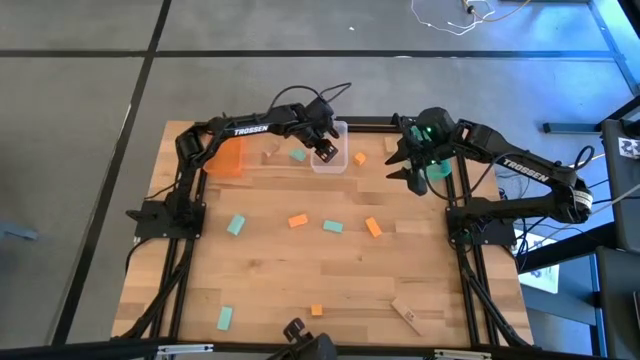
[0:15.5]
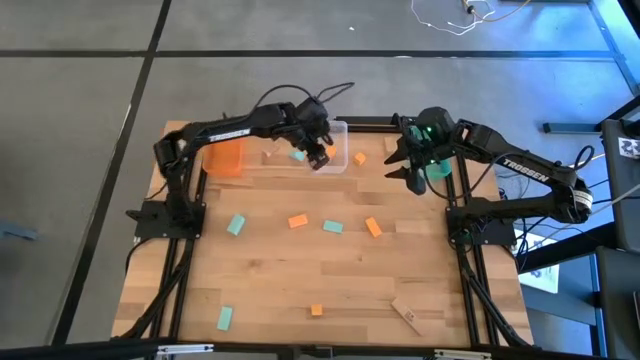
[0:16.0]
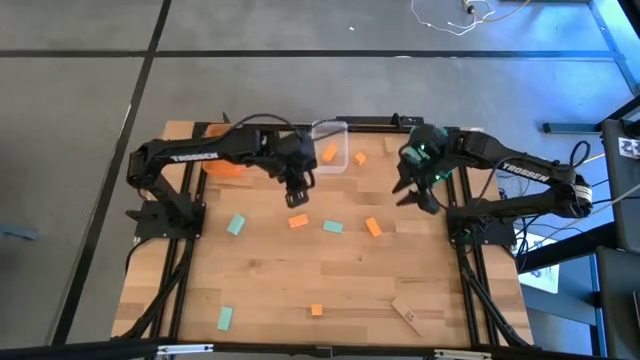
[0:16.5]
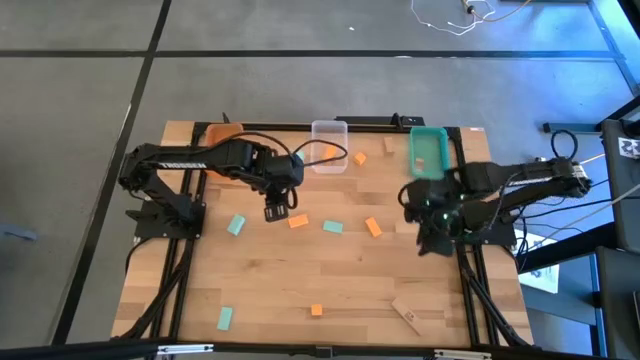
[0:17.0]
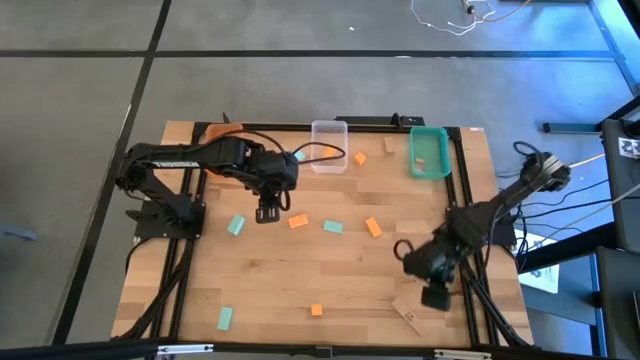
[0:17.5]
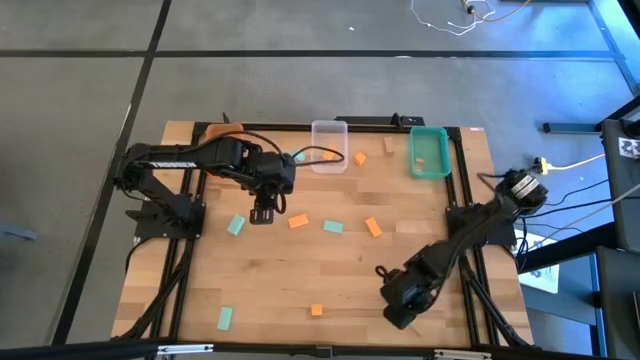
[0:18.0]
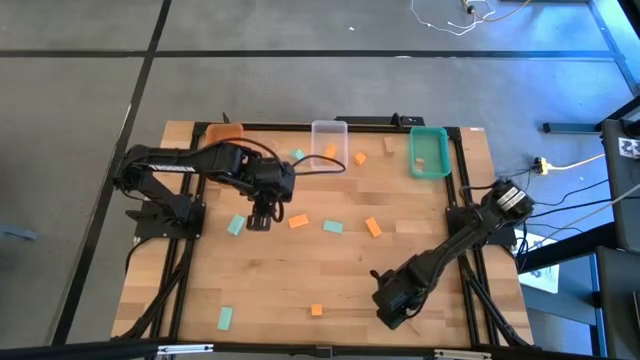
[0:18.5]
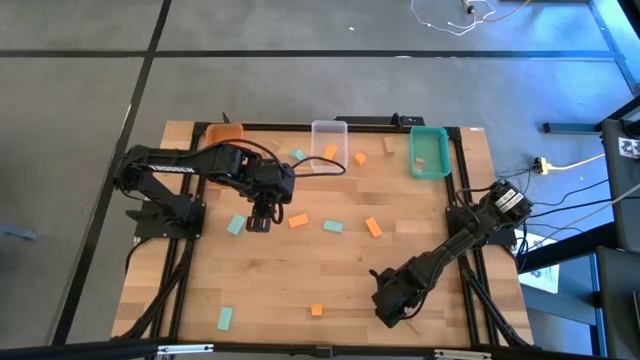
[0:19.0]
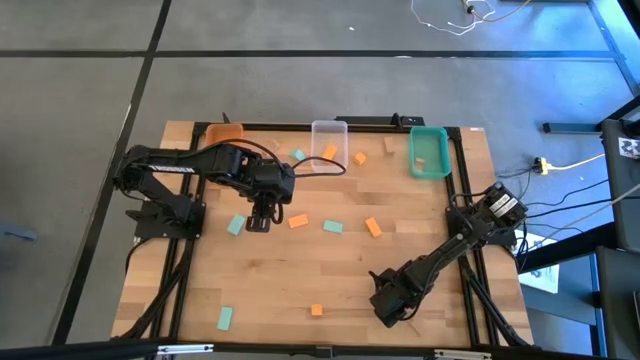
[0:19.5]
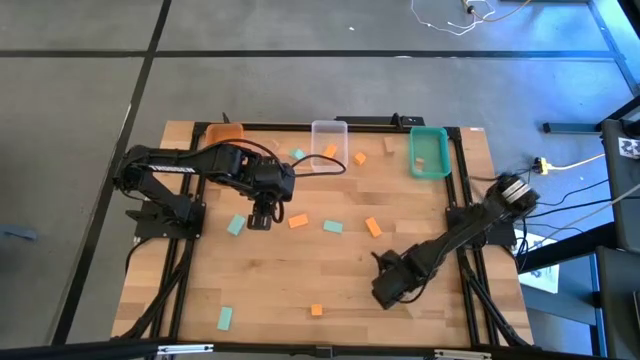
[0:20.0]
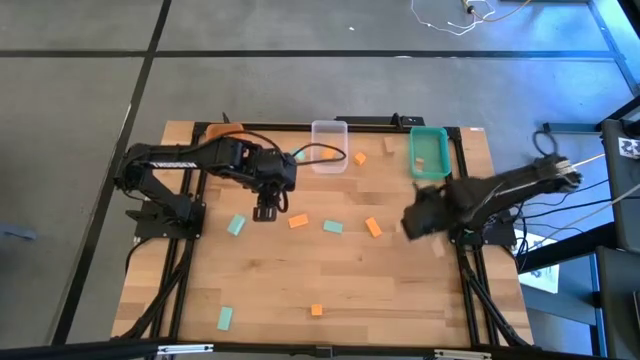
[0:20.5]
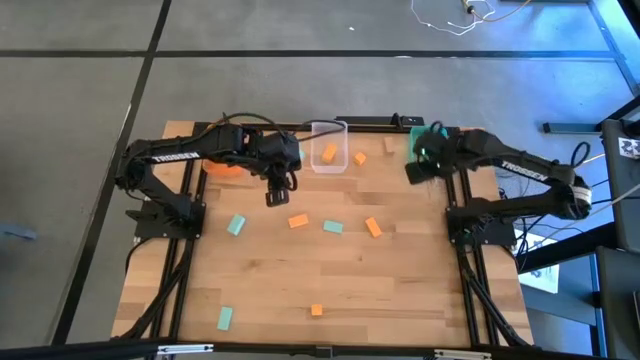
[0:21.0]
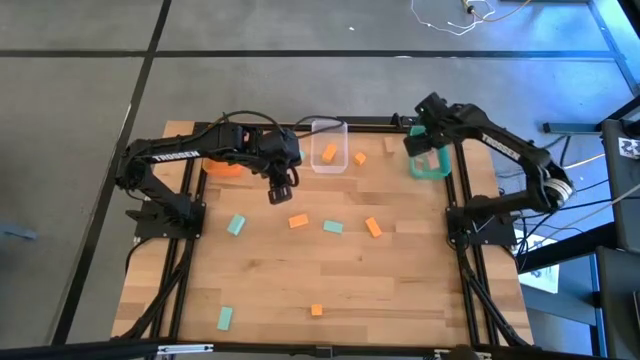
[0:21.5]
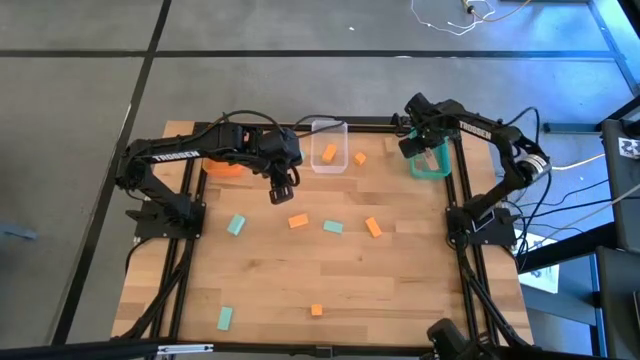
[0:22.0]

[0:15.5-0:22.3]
Task: Sort & place blocks by color
Put the brown block into the blue bin

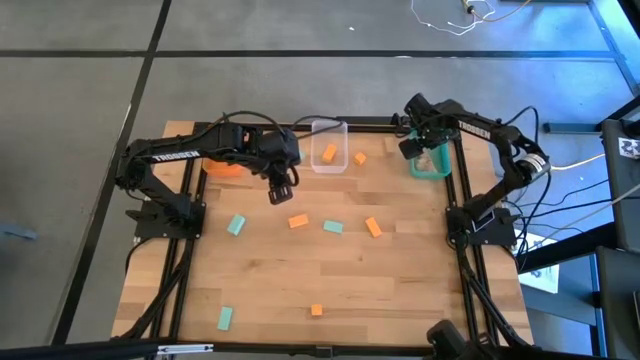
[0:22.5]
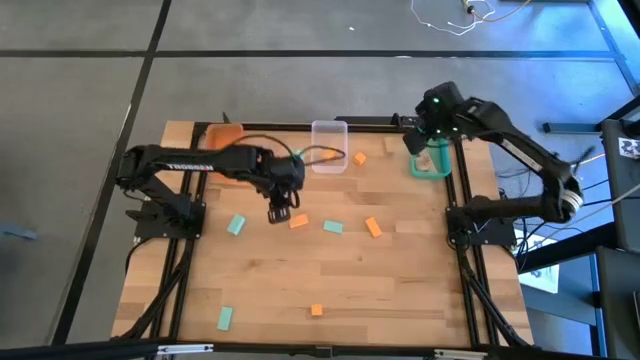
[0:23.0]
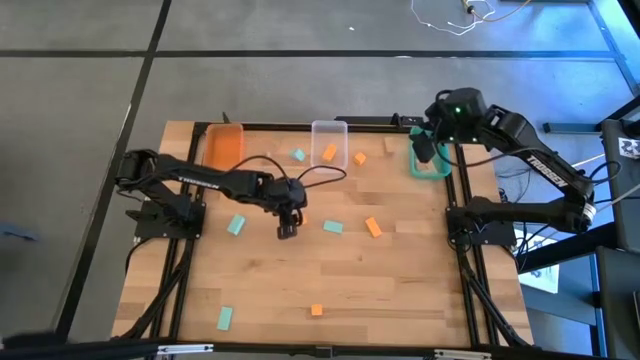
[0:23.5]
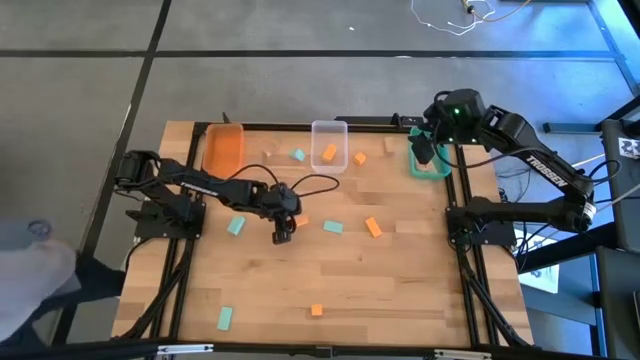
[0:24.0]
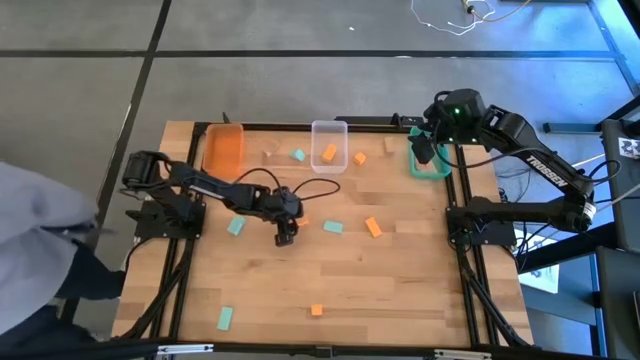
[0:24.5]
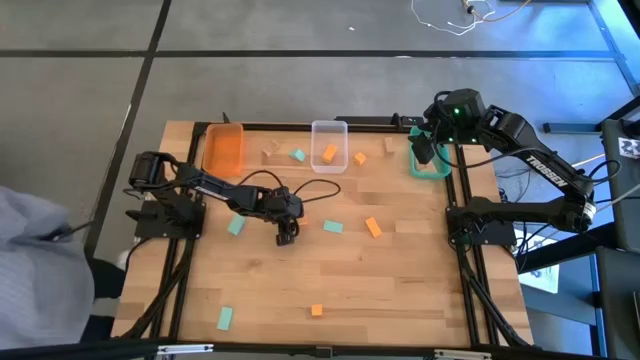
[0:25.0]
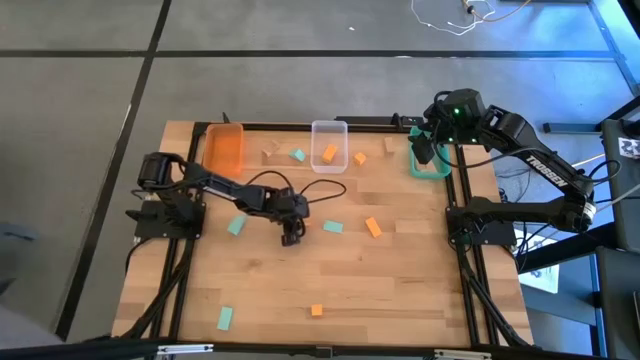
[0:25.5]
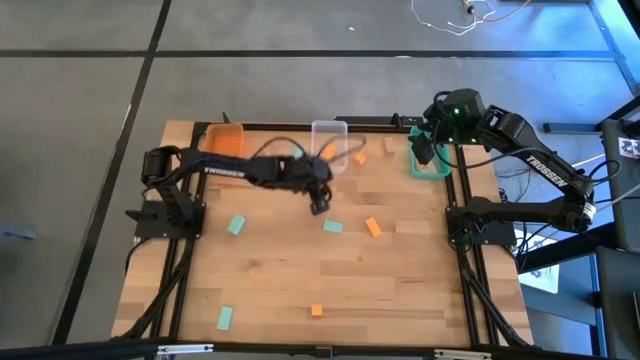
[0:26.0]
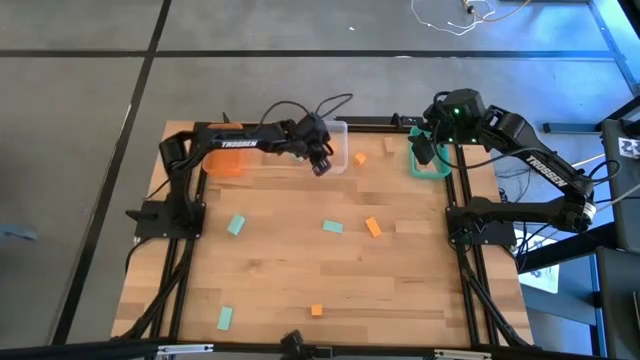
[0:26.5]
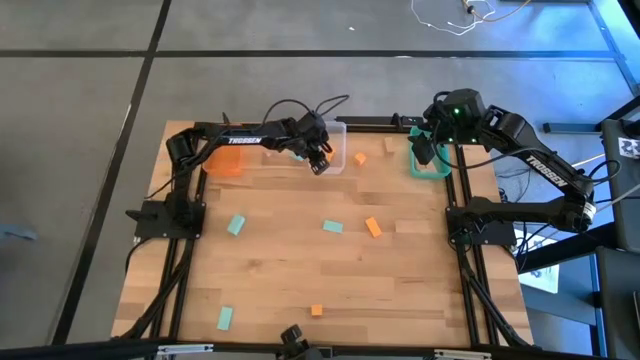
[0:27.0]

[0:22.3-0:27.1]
Put the orange block into the transparent bin

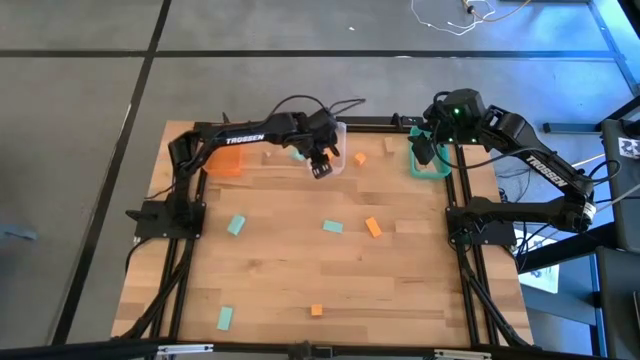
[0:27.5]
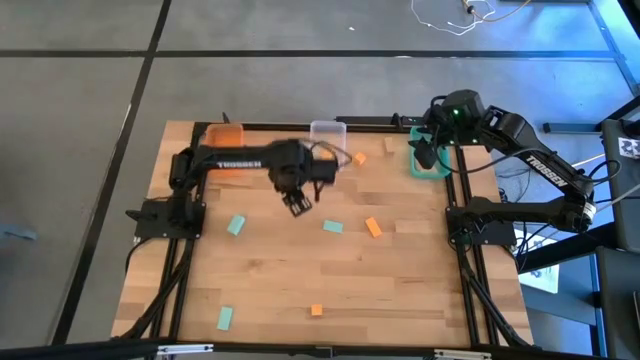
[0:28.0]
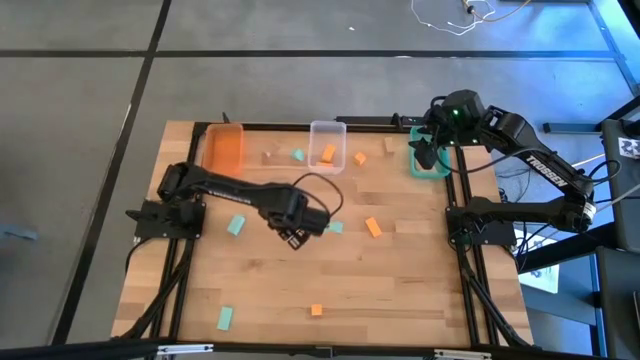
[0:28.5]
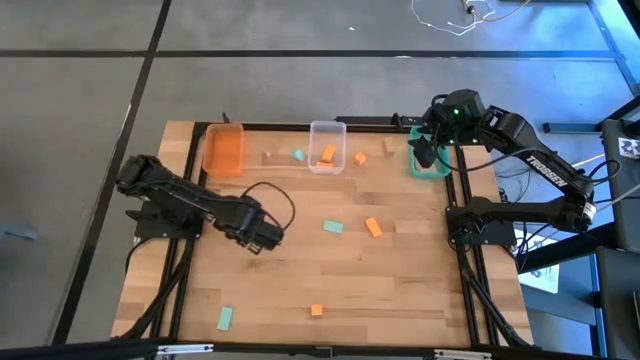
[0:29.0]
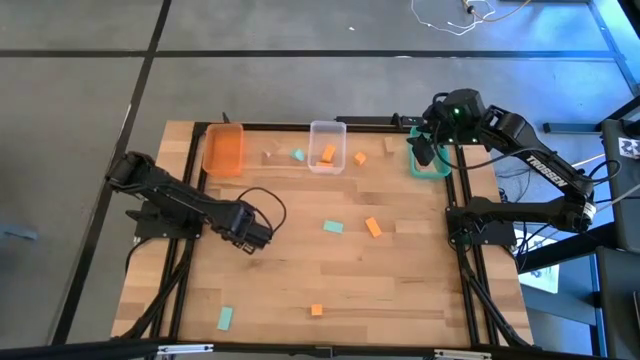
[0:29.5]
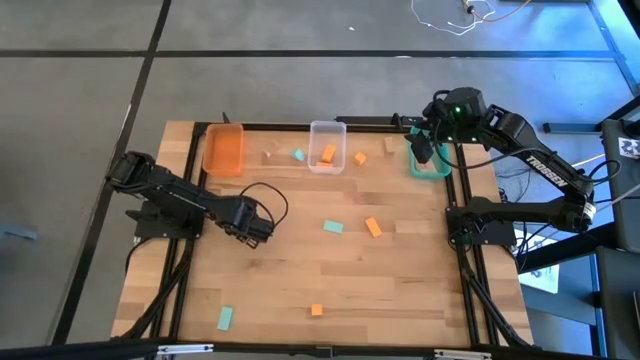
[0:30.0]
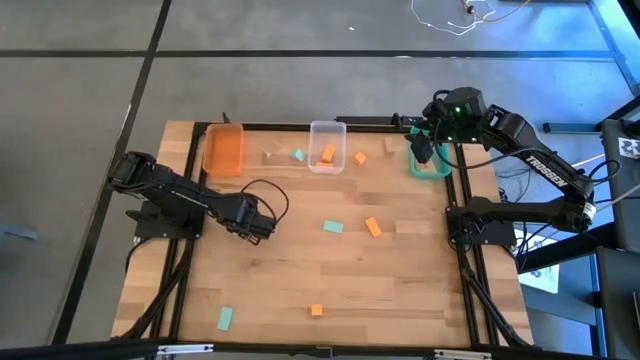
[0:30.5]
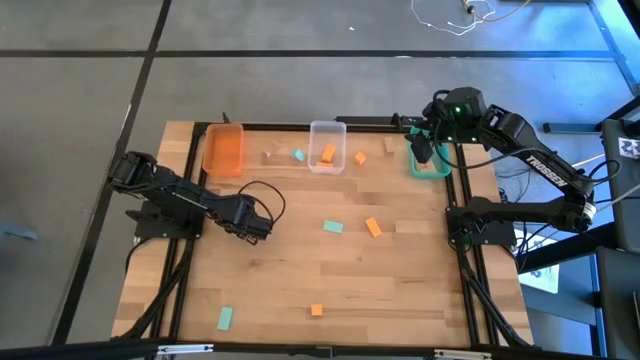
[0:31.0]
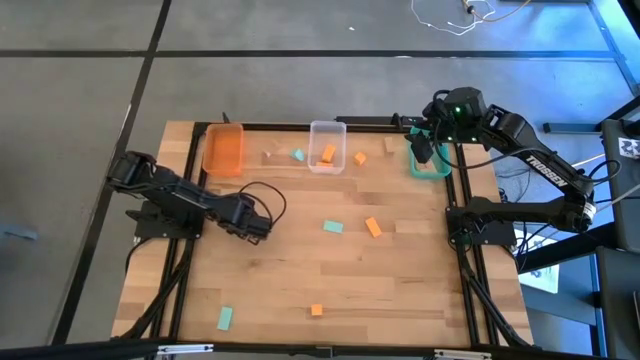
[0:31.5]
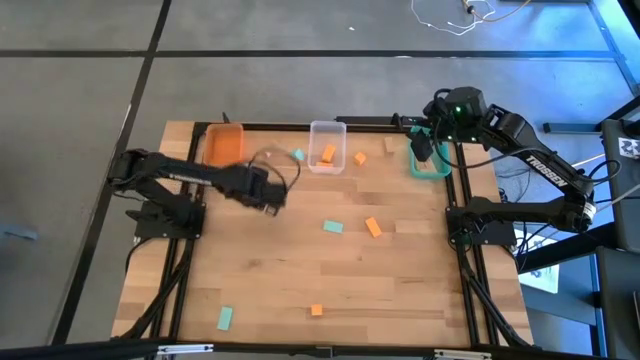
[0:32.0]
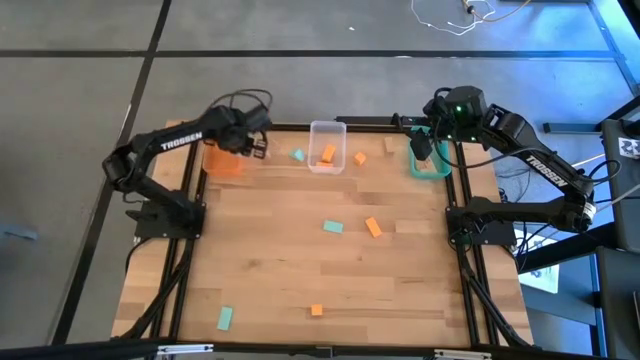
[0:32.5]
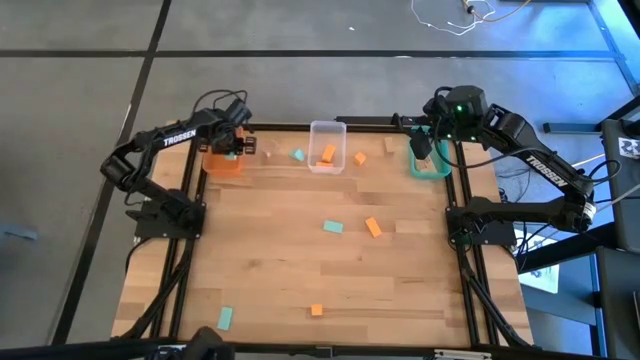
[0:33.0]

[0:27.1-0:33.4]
Put the blue block into the orange bin

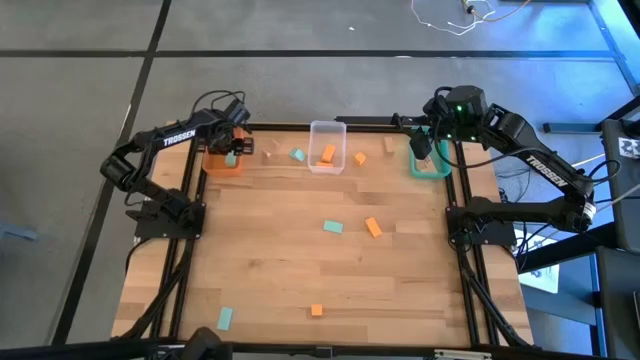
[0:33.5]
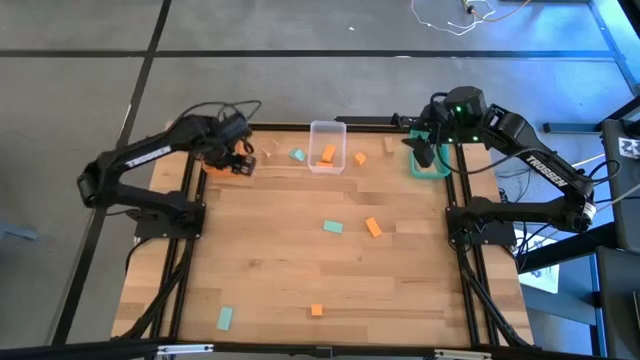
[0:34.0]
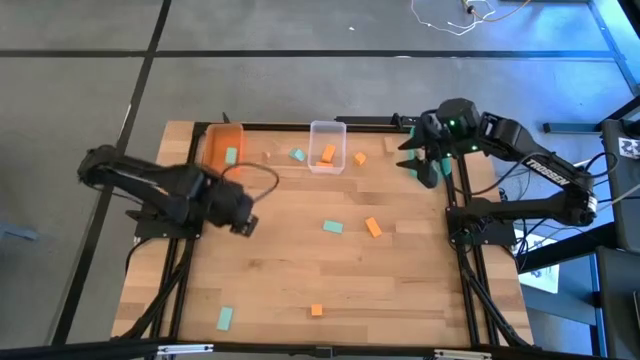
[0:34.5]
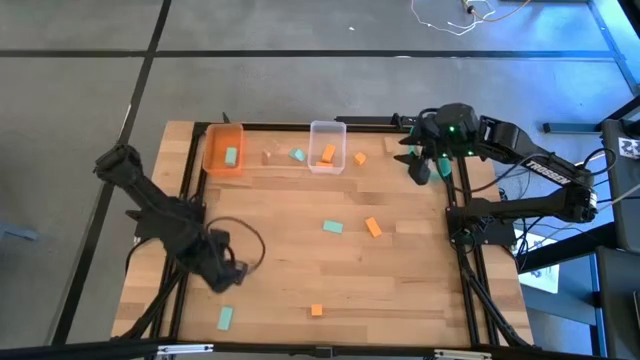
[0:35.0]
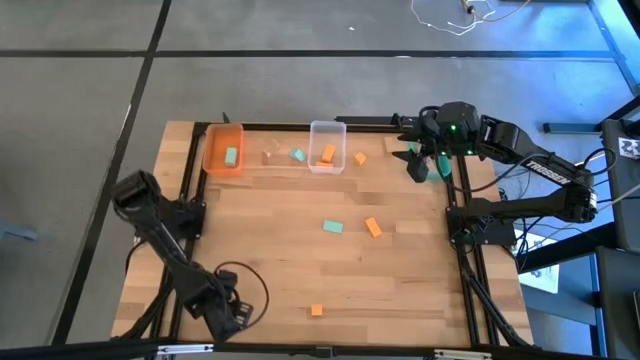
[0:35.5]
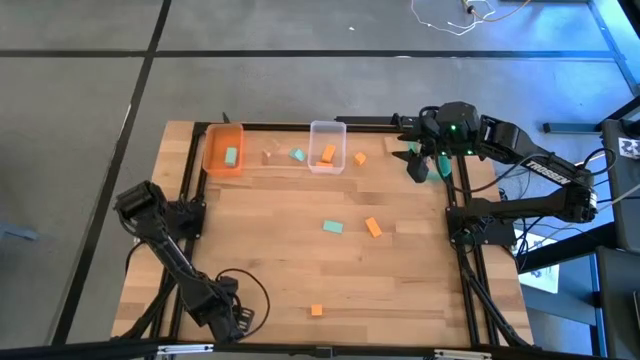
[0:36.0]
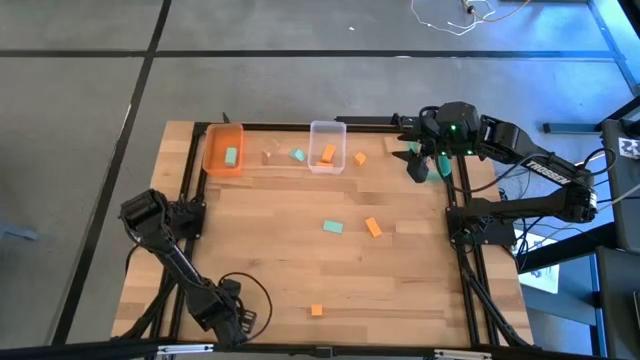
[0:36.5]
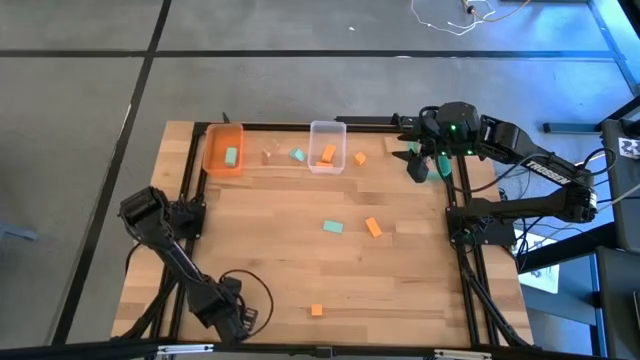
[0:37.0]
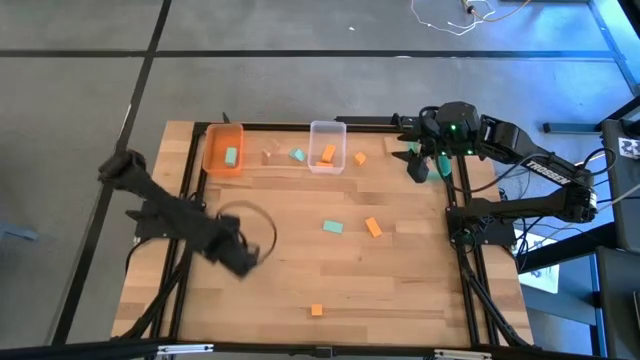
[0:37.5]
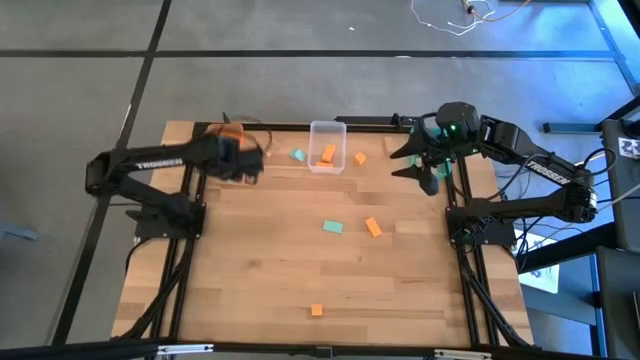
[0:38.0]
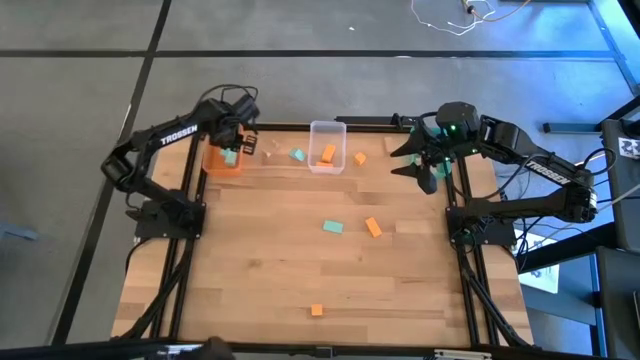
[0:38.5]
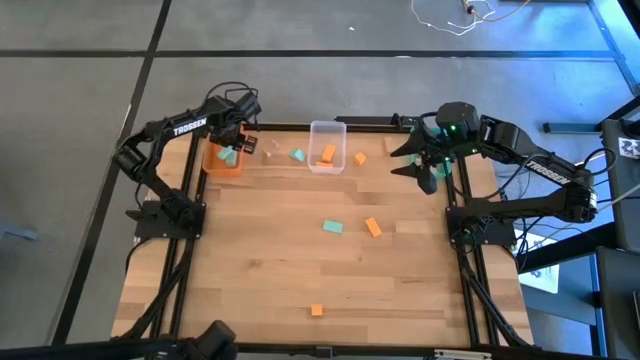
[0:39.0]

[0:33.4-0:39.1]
Put the blue block into the orange bin
